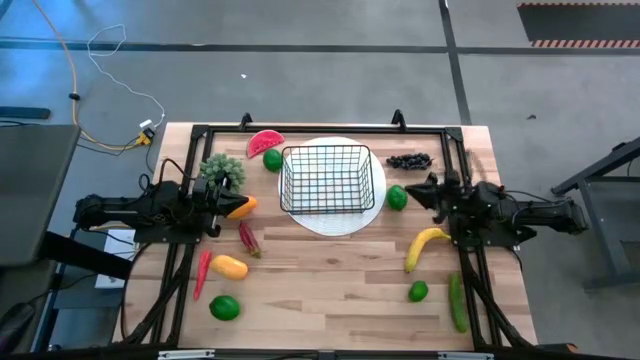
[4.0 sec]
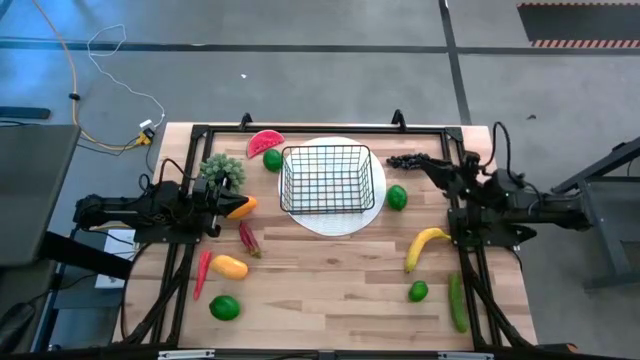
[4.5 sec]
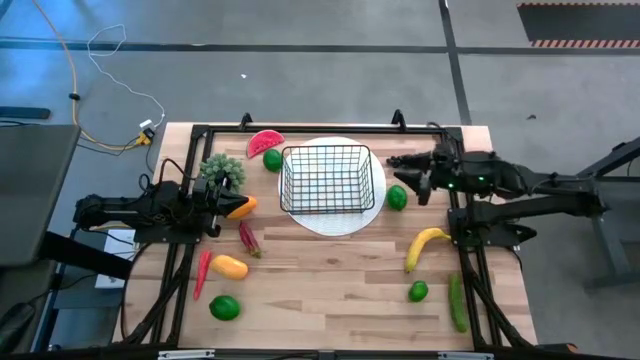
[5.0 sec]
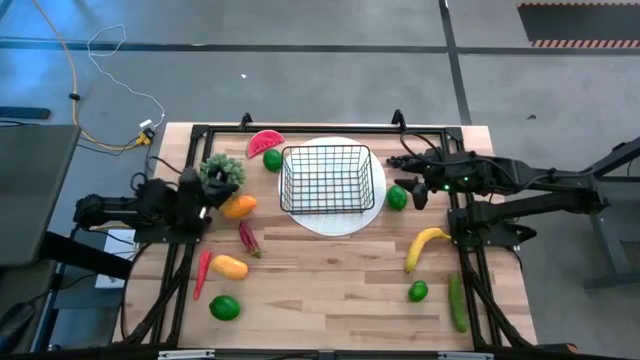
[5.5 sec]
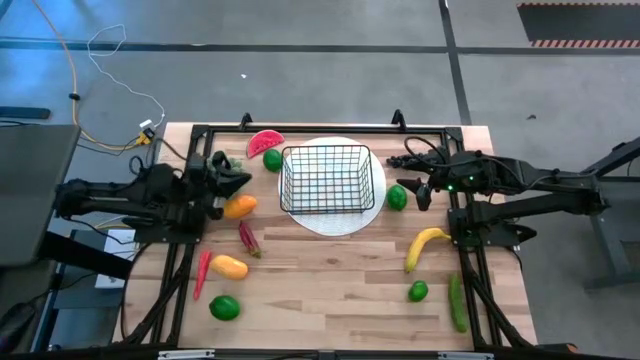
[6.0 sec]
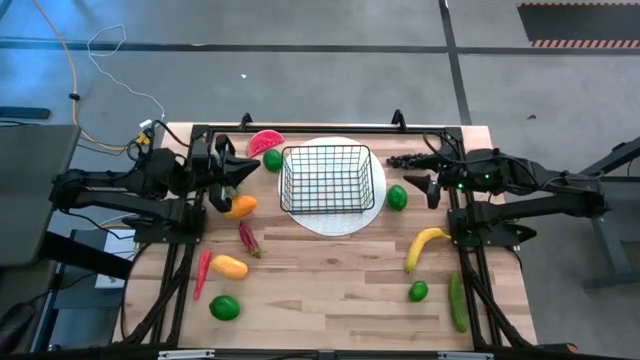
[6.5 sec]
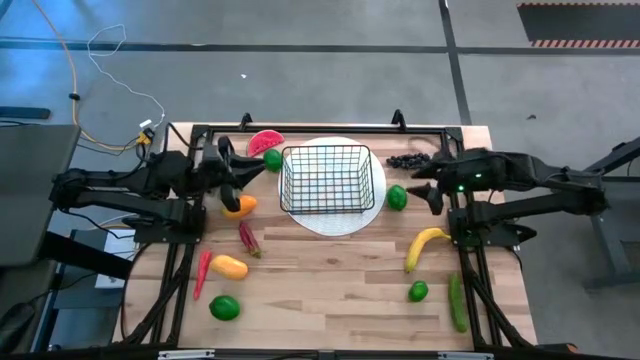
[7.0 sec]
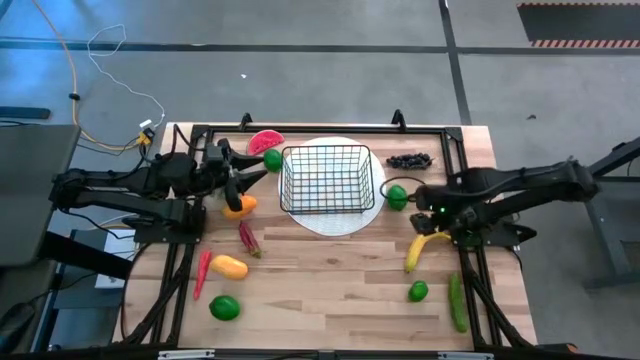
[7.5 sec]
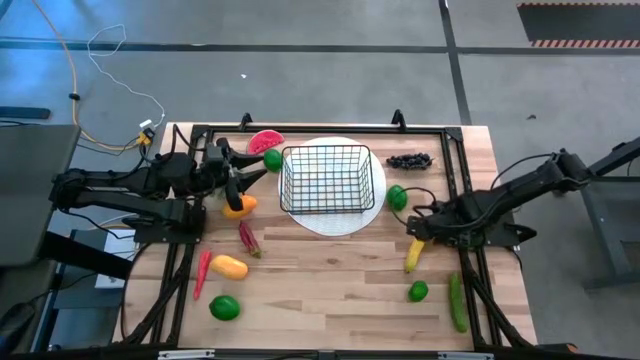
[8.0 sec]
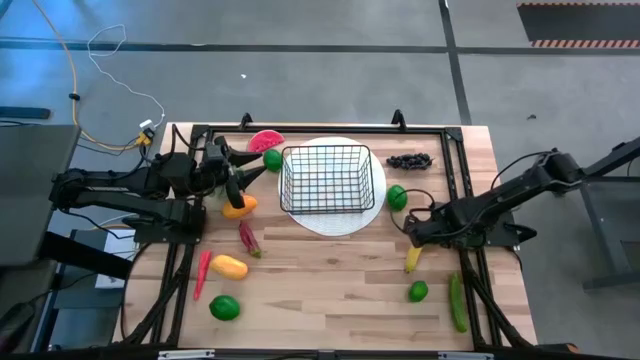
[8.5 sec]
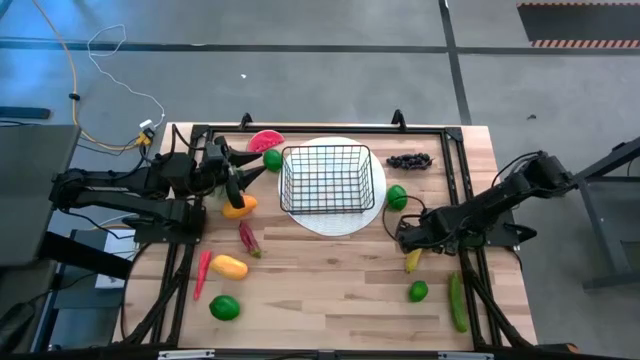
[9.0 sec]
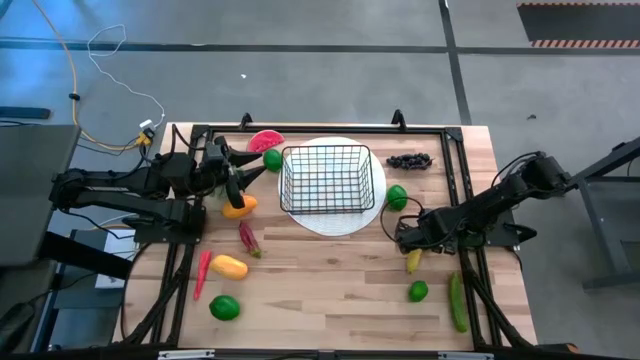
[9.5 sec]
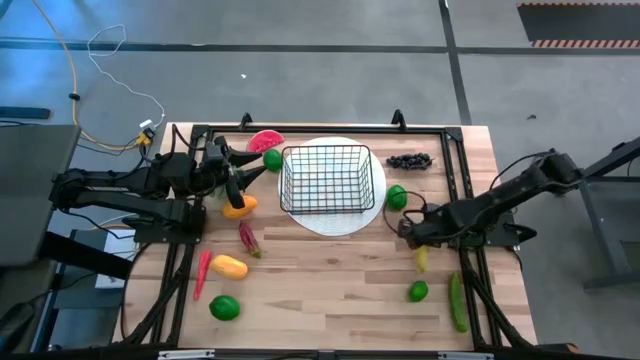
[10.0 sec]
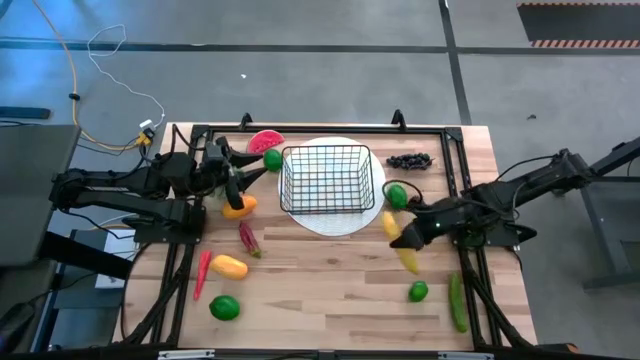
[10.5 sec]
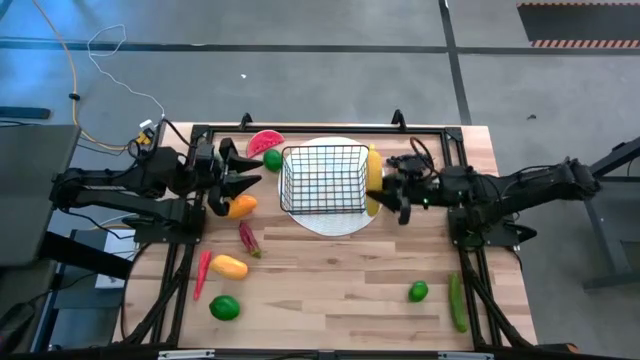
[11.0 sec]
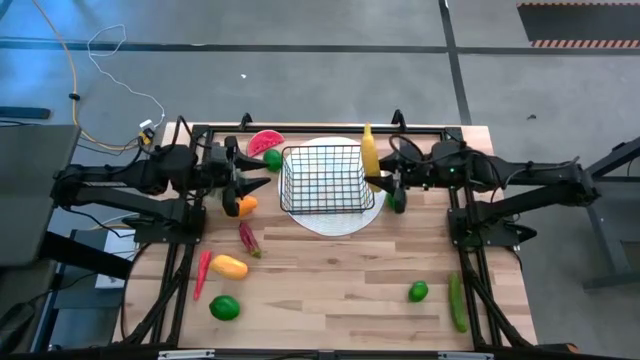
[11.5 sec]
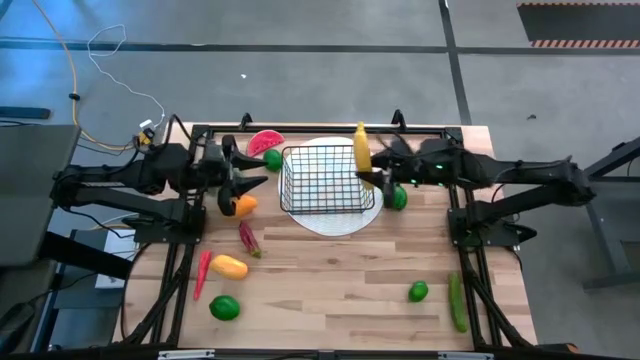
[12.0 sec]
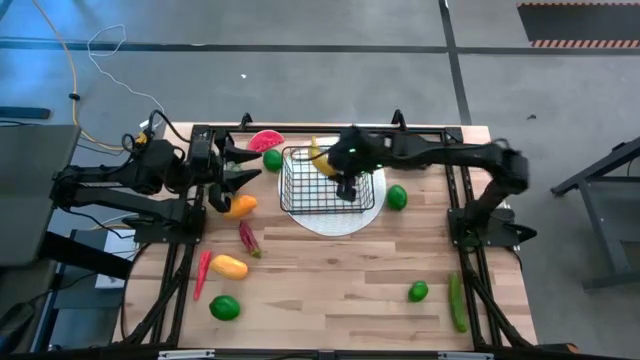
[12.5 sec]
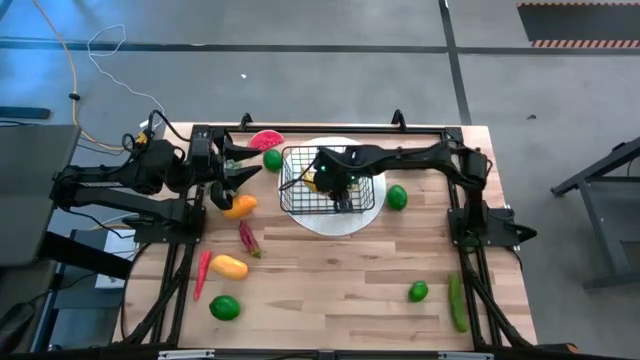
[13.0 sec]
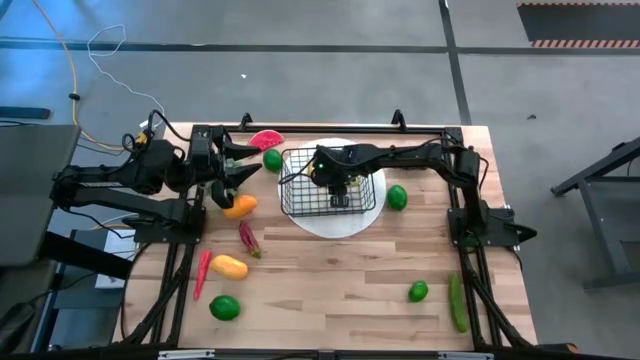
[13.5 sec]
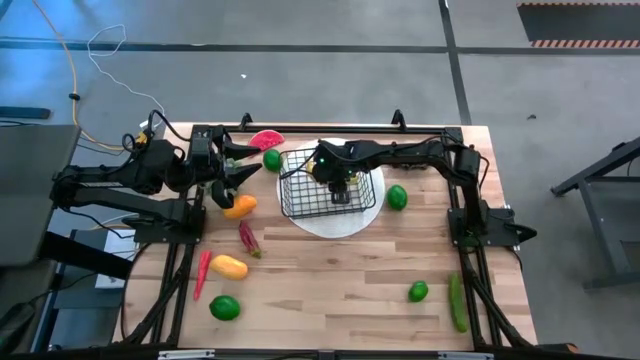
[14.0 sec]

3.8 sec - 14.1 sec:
Task: Build produce basket
Put the yellow banana into the black wire basket

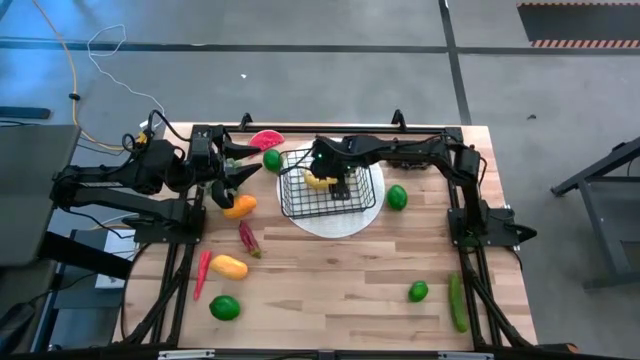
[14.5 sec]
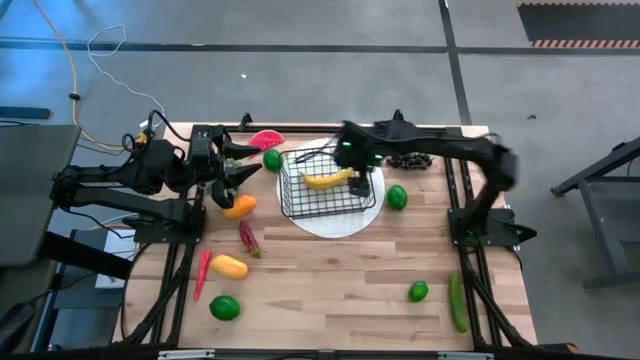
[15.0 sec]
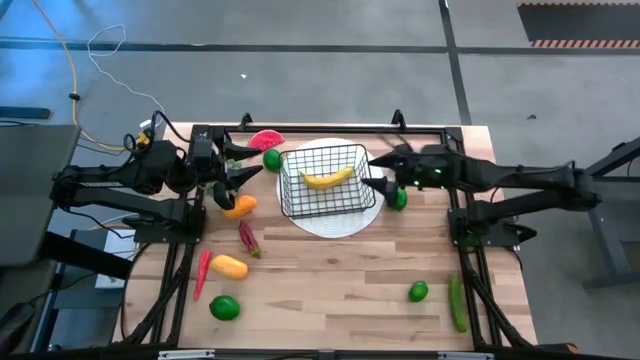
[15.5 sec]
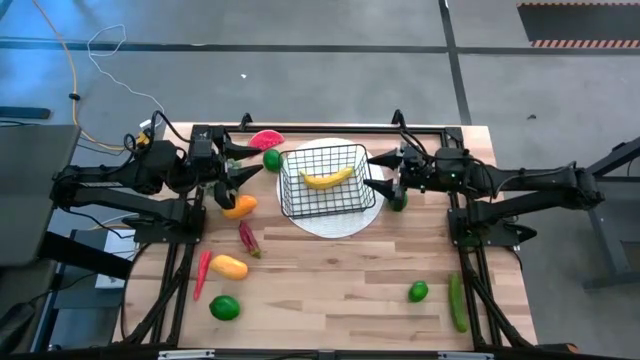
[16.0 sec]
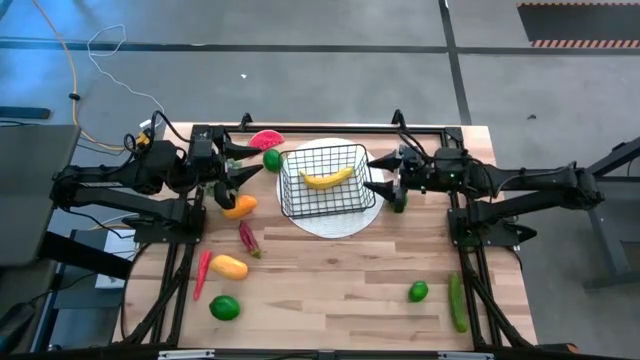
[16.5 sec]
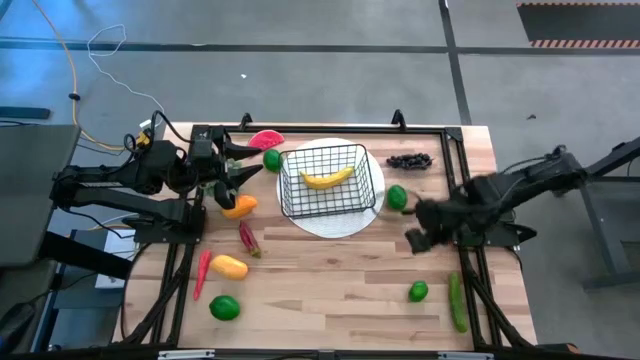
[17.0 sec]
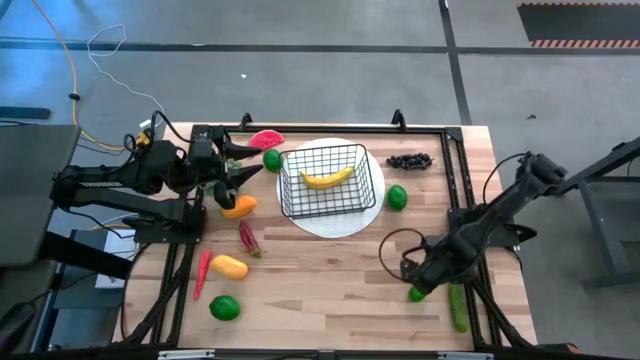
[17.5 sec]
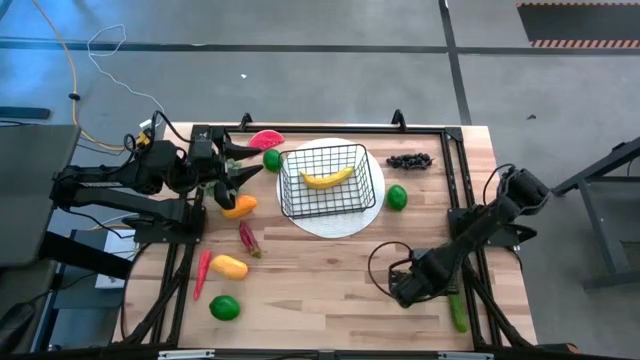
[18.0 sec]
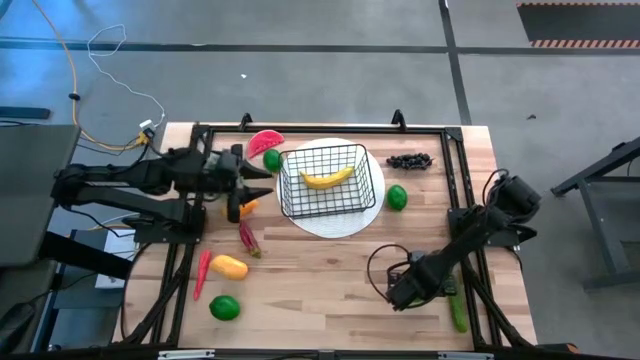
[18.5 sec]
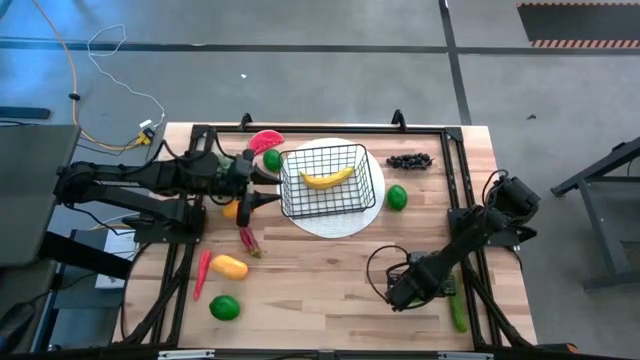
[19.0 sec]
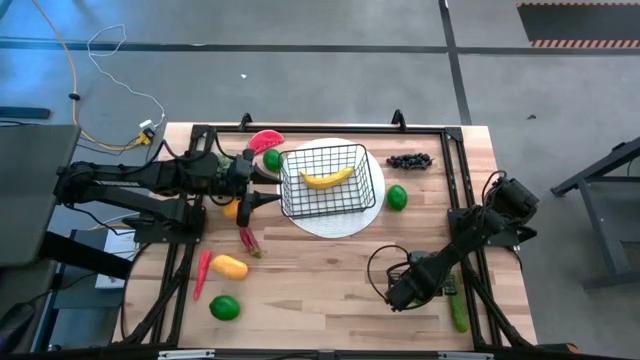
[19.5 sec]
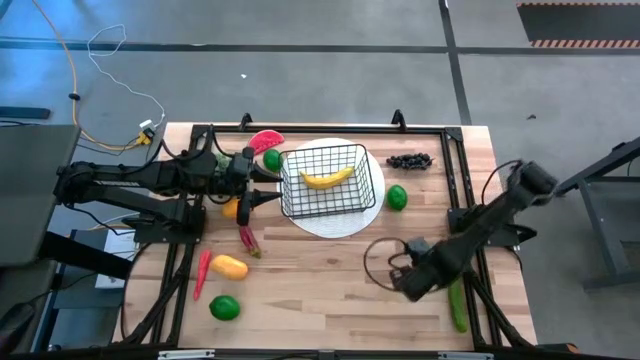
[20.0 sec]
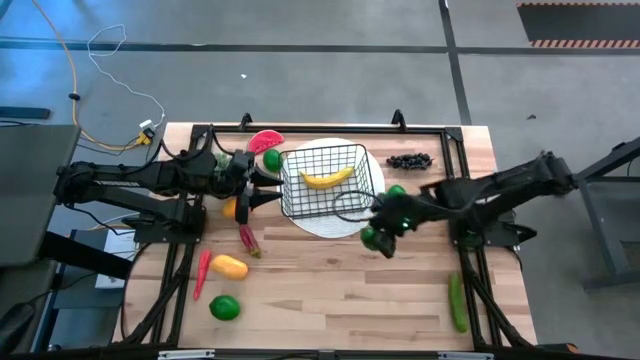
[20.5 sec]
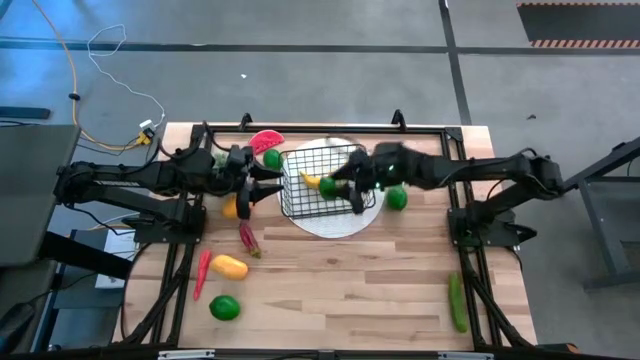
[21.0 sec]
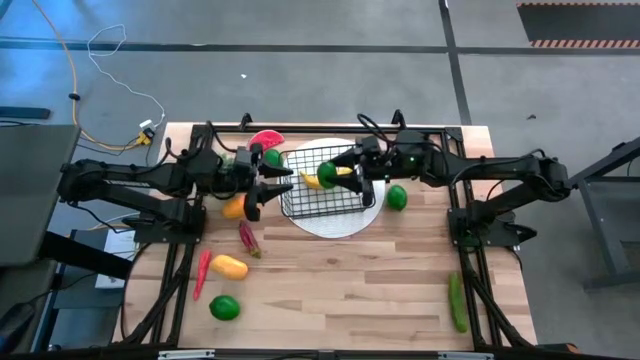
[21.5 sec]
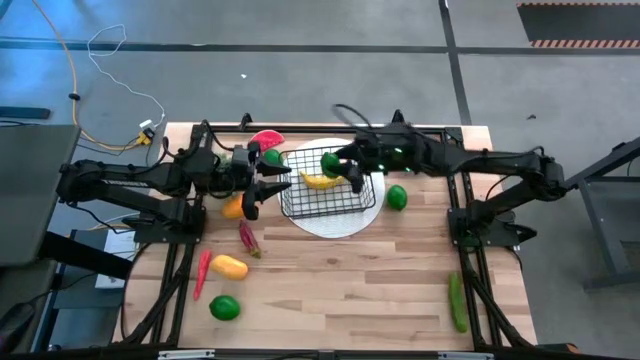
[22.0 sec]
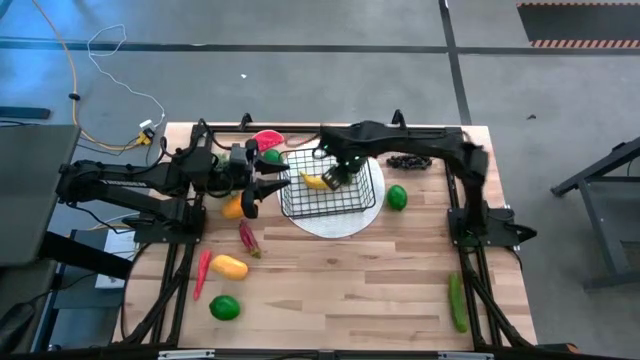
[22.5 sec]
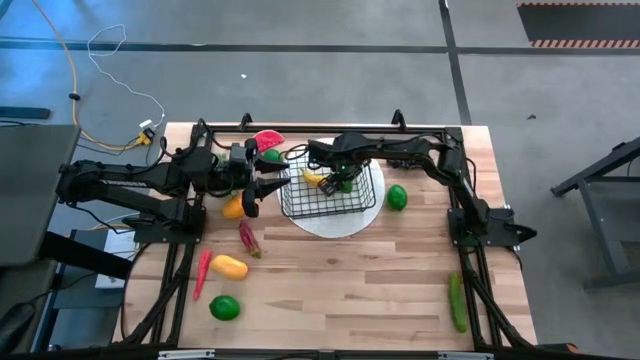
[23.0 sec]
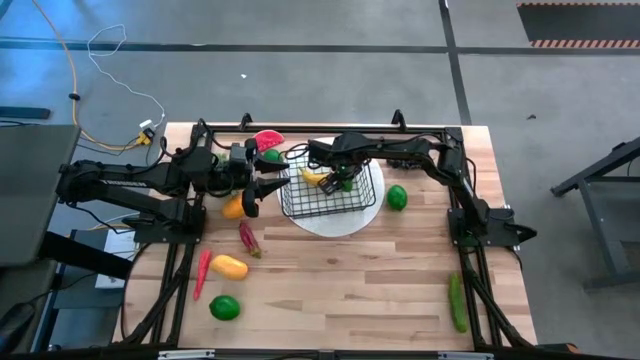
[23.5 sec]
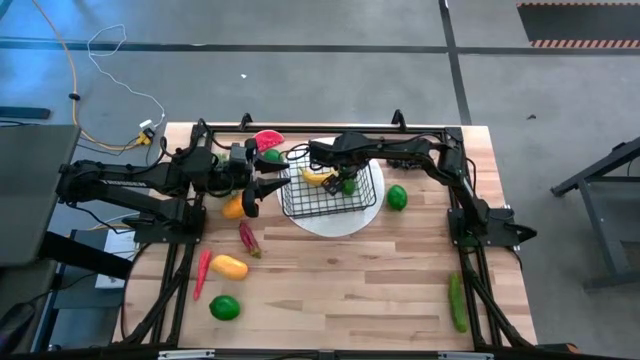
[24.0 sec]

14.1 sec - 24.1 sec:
Put the green lime into the black wire basket
